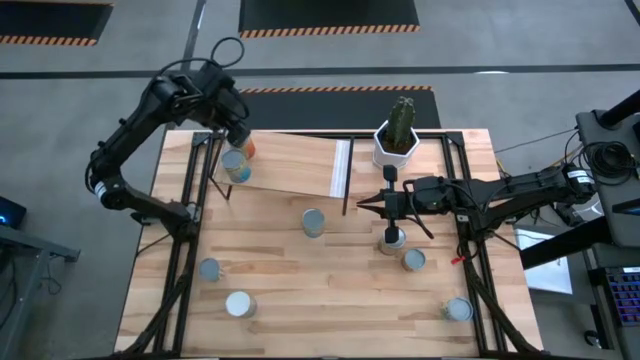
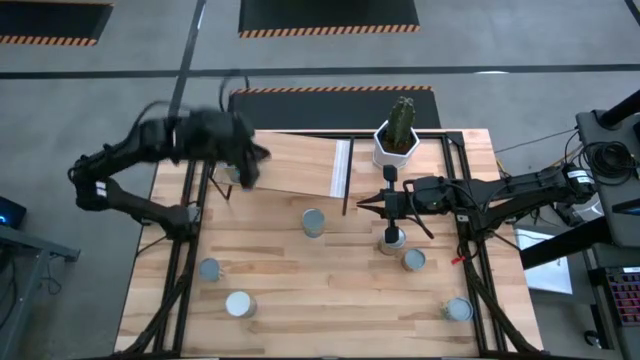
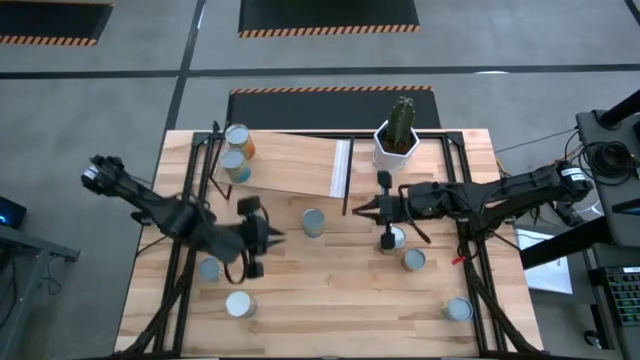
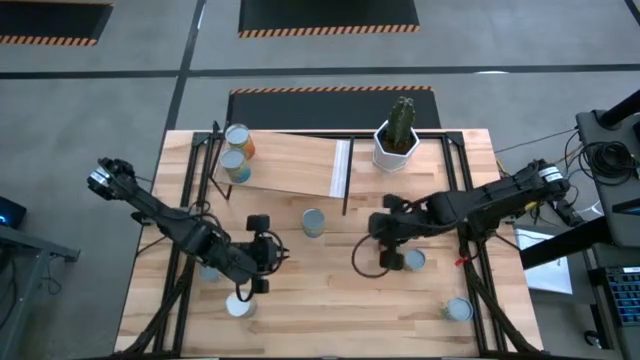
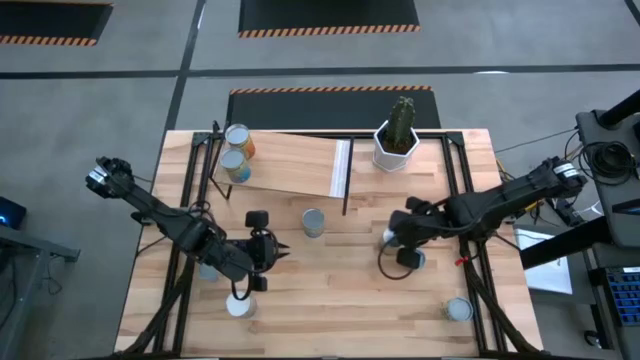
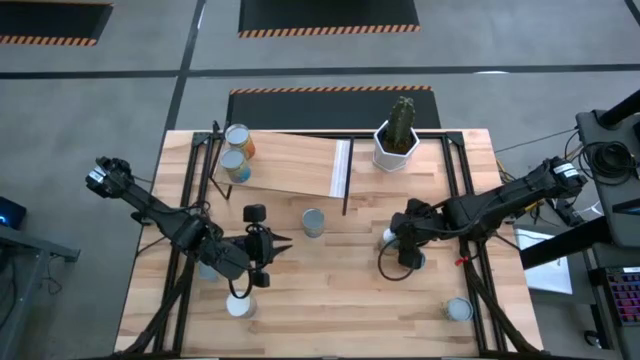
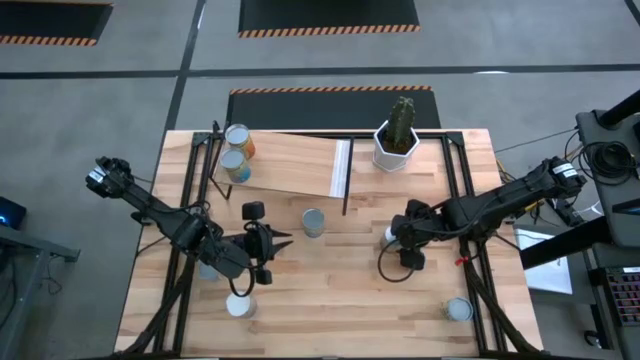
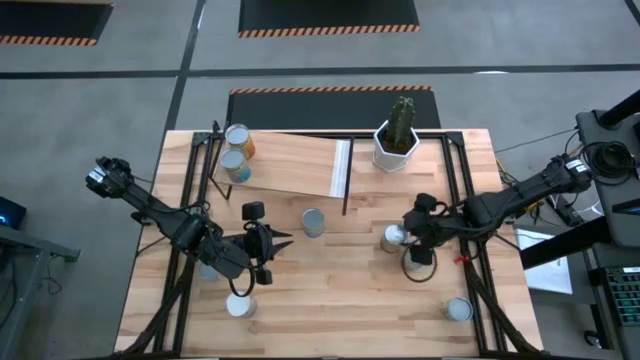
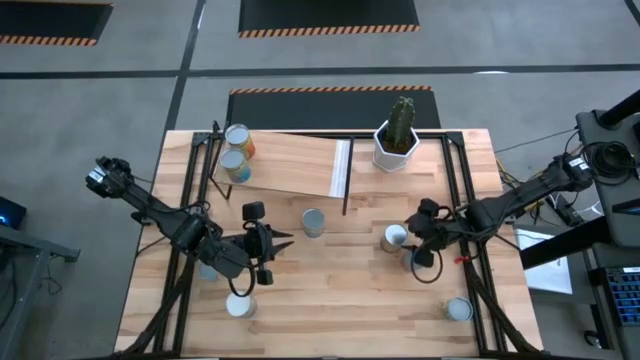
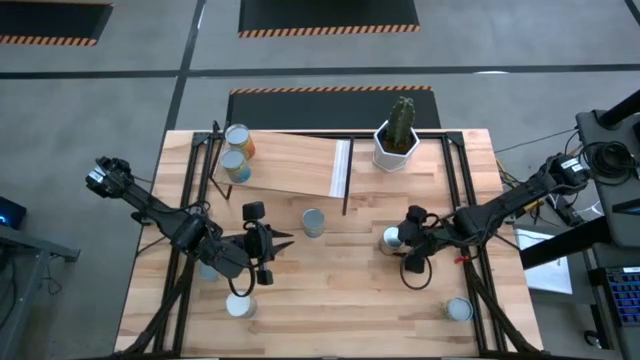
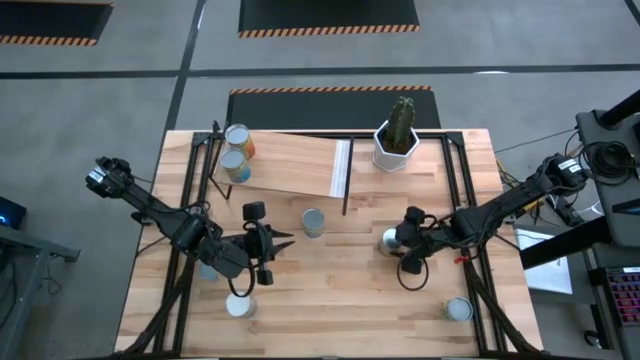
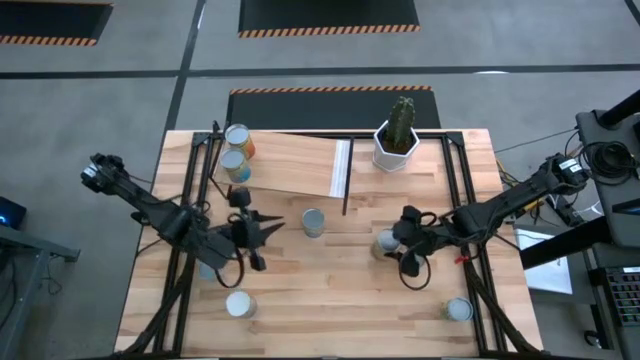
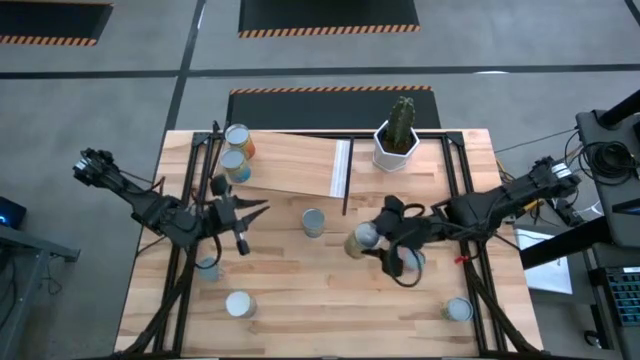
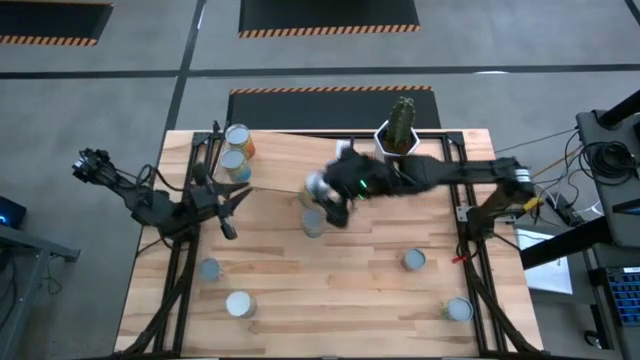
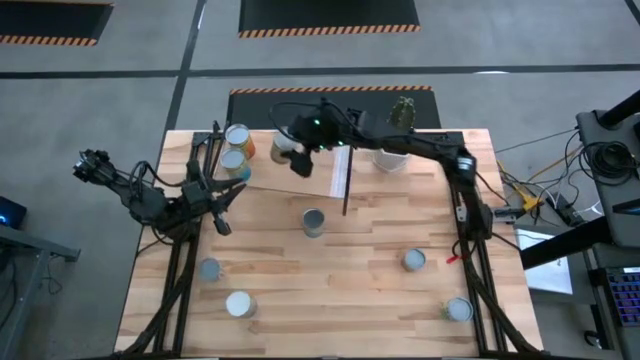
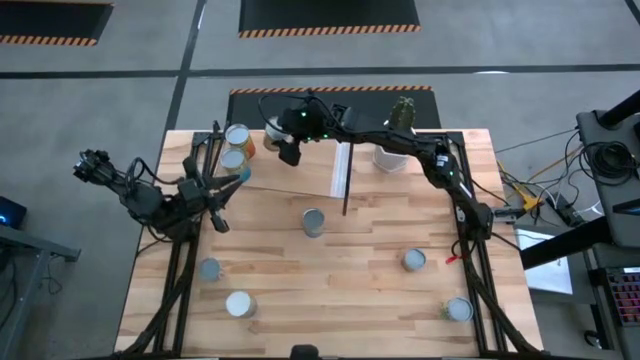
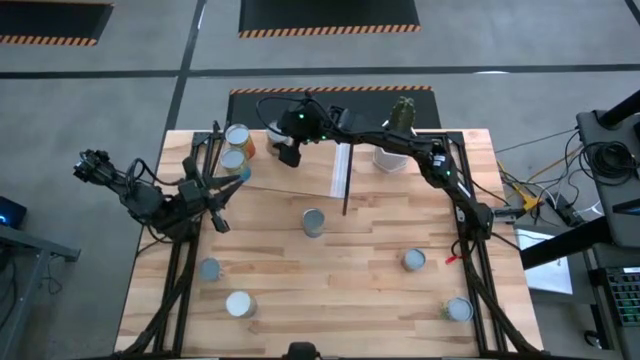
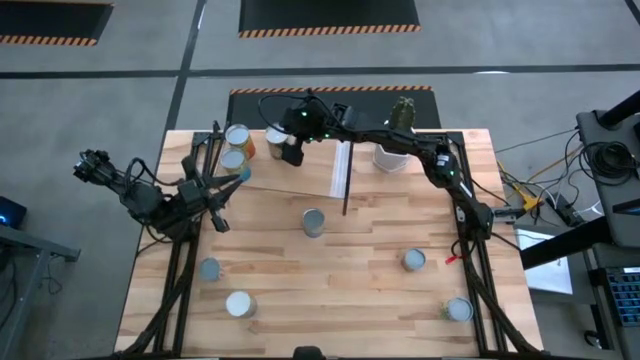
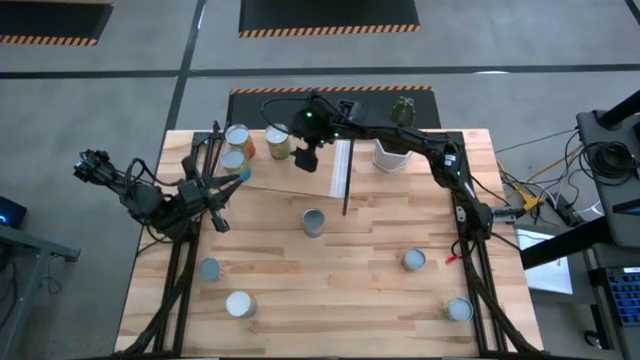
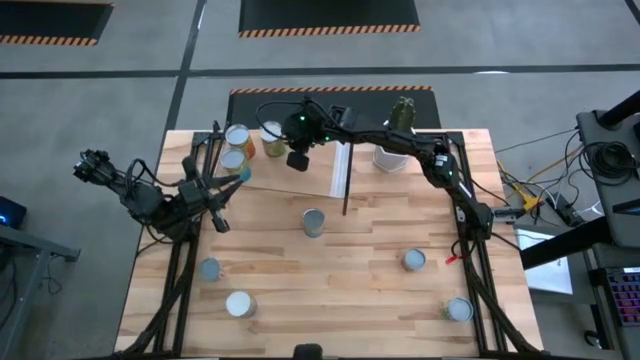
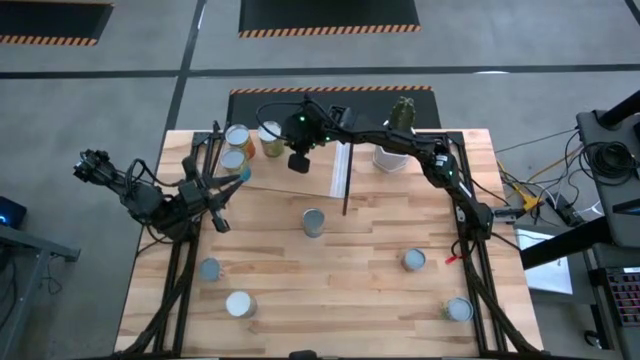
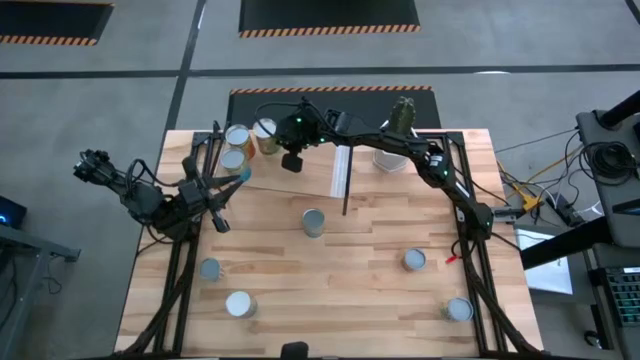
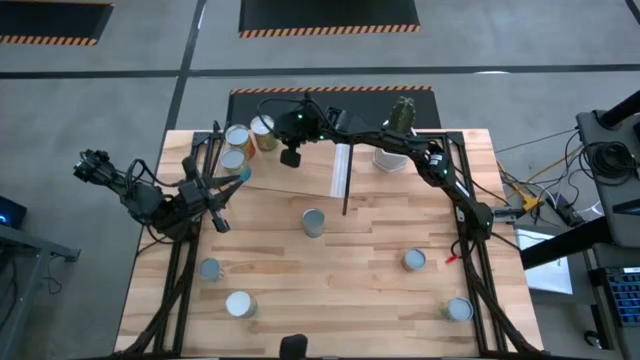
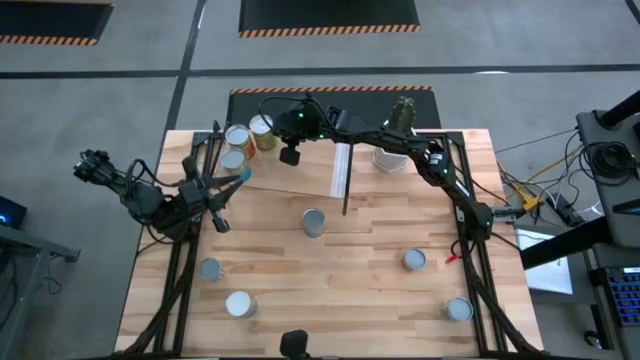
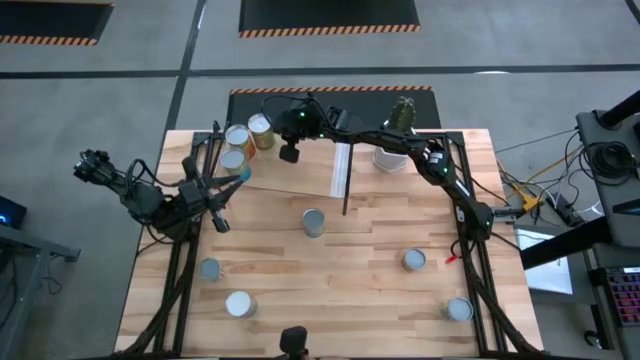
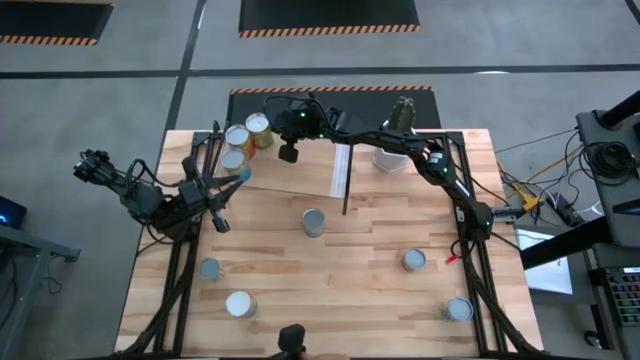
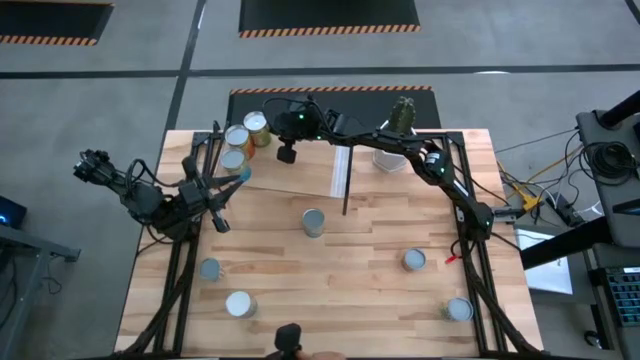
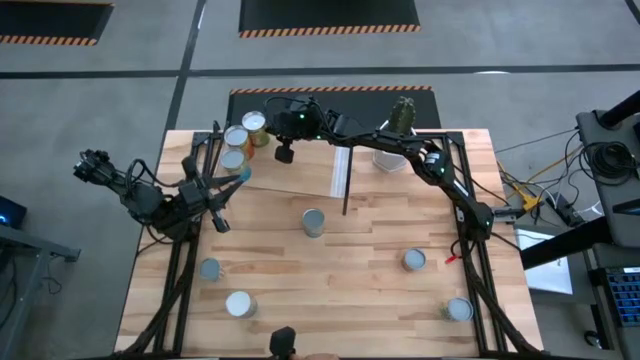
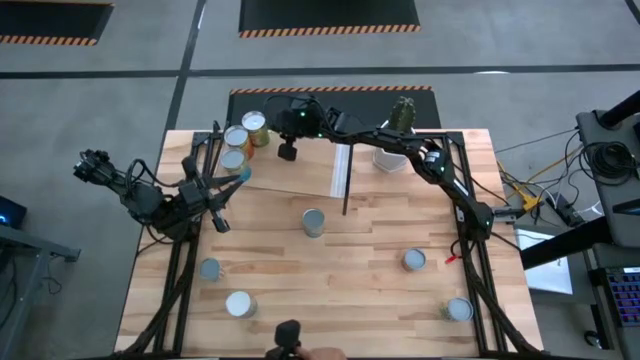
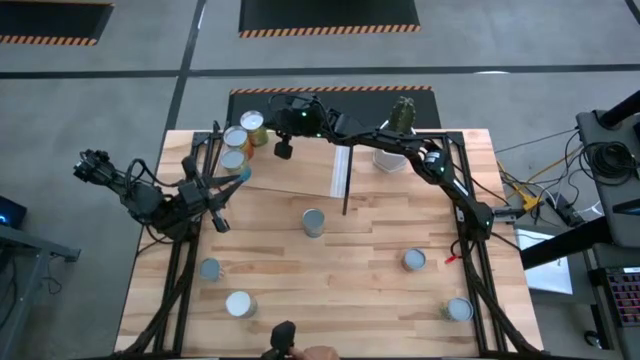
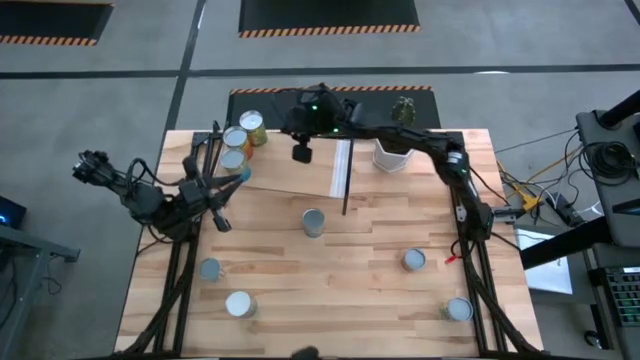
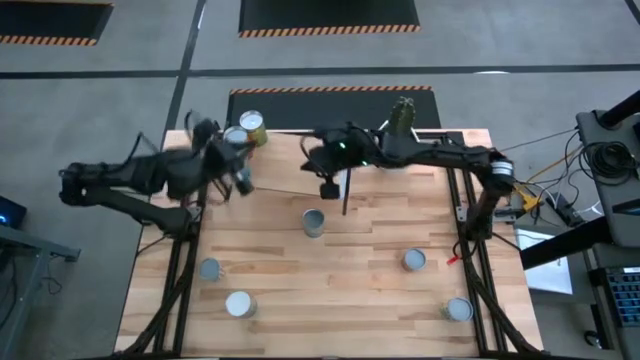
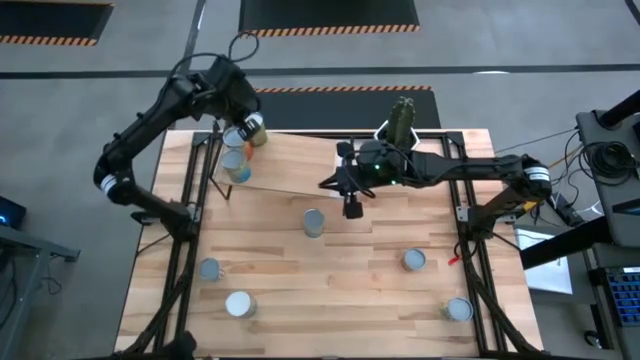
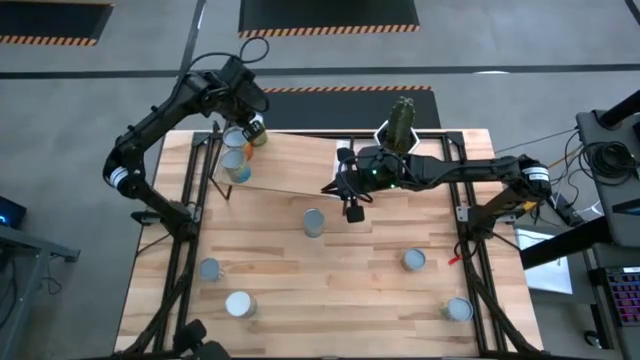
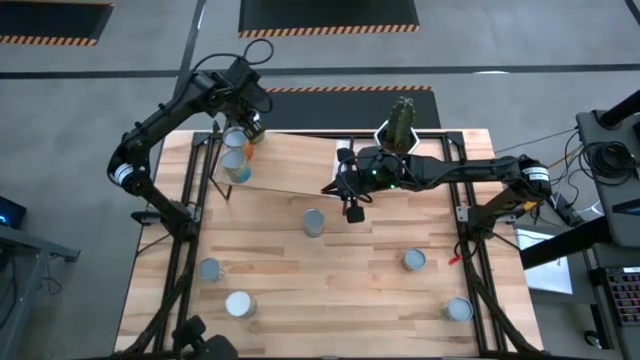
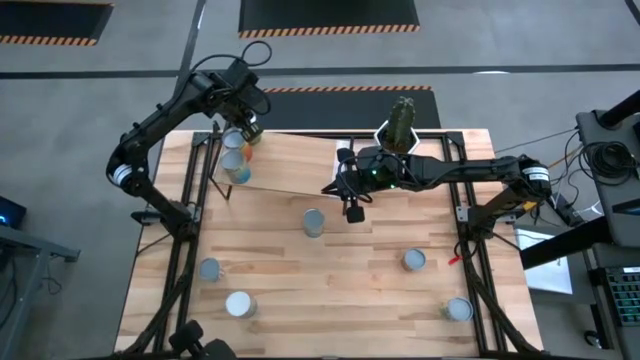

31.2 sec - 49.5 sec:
Task: Pick and place cans onto a shelf
Put the large canned oranges on the shelf

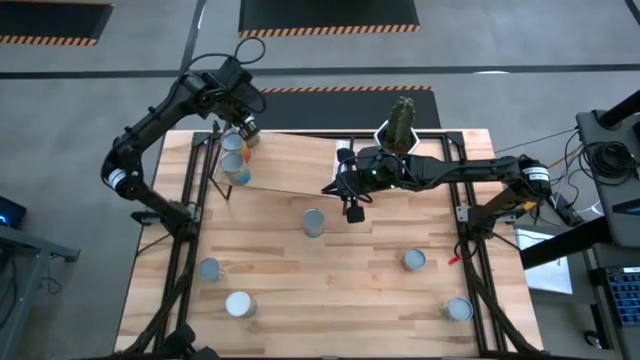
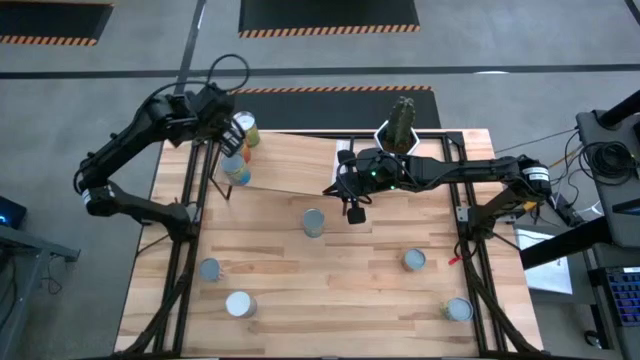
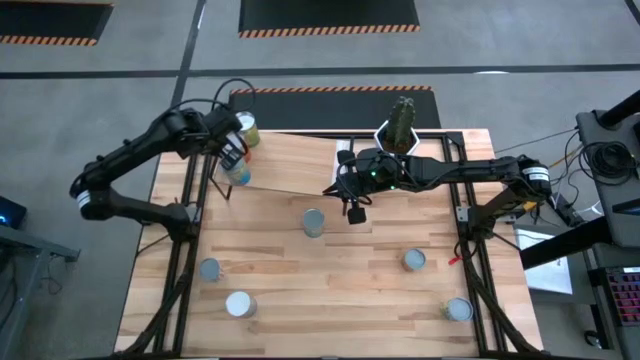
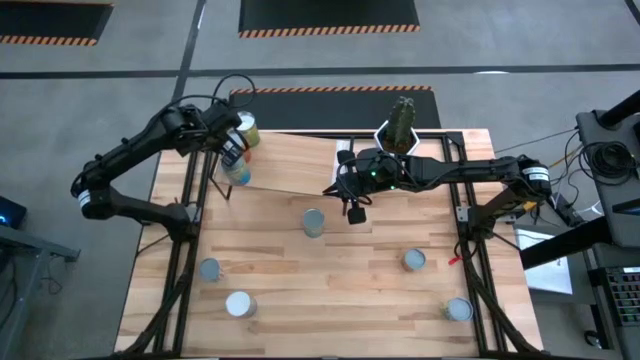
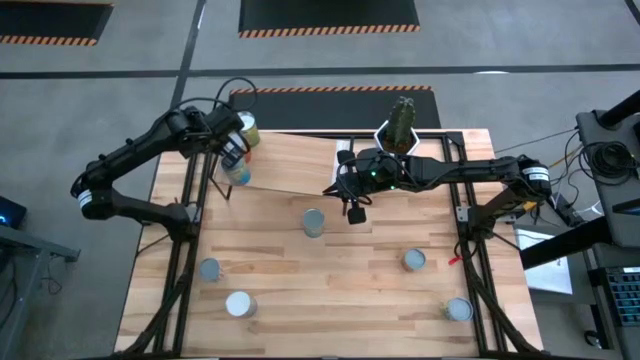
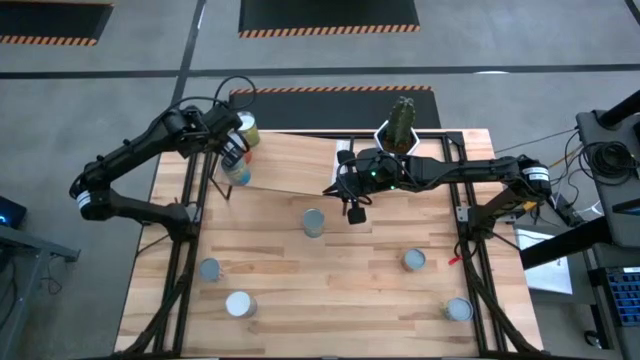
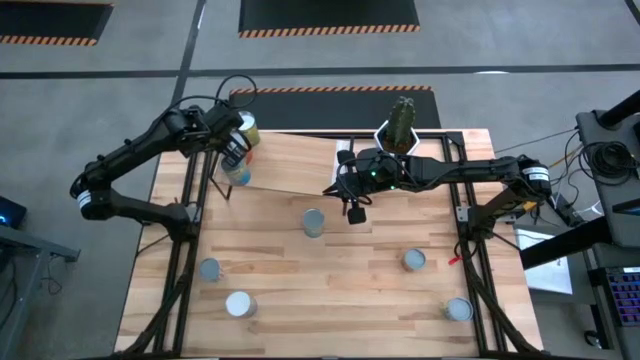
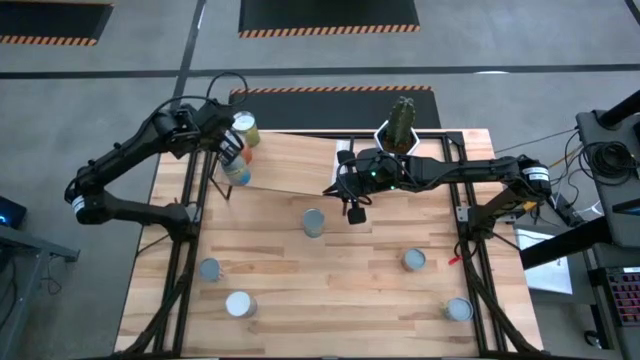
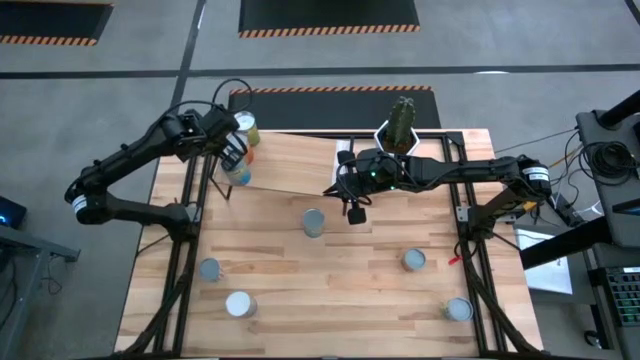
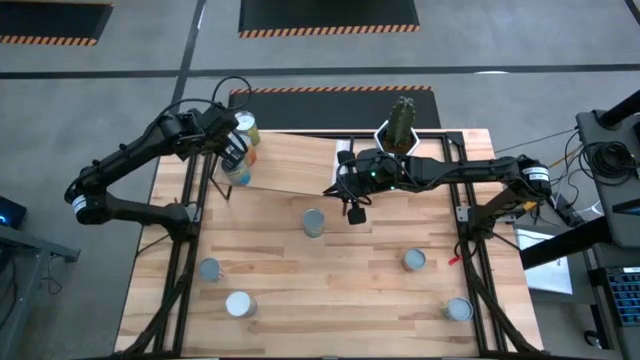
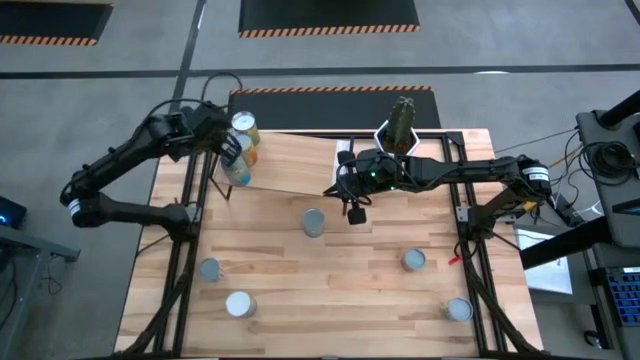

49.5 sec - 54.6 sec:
Adjust the canned pineapple on the shelf
